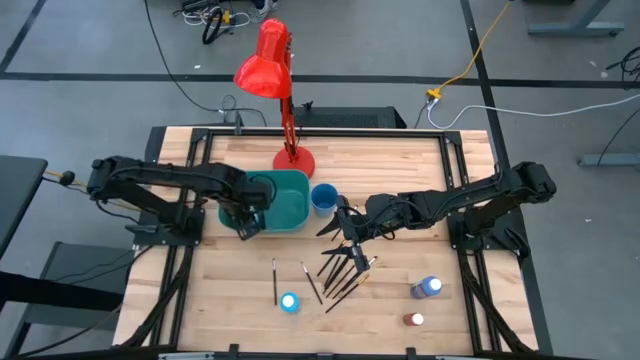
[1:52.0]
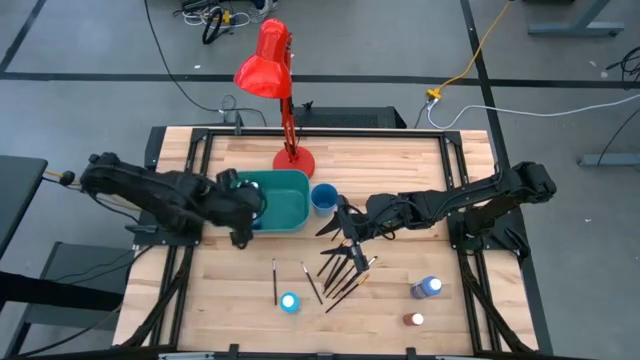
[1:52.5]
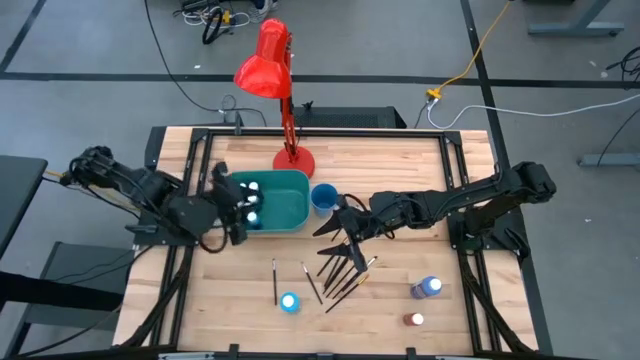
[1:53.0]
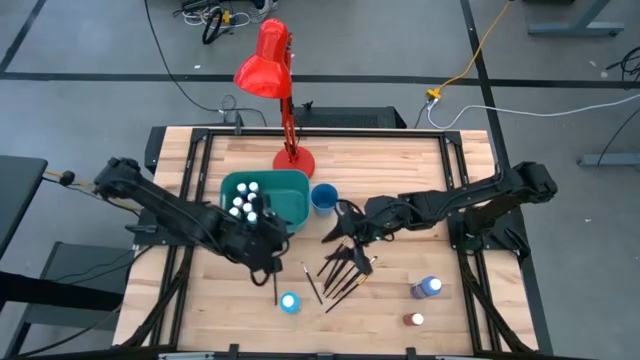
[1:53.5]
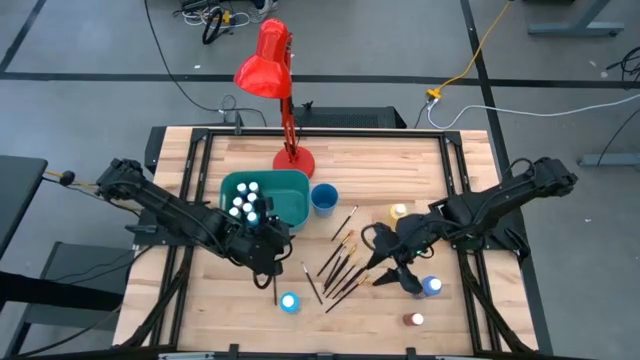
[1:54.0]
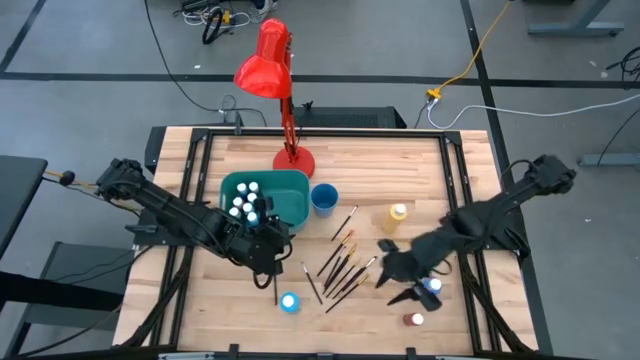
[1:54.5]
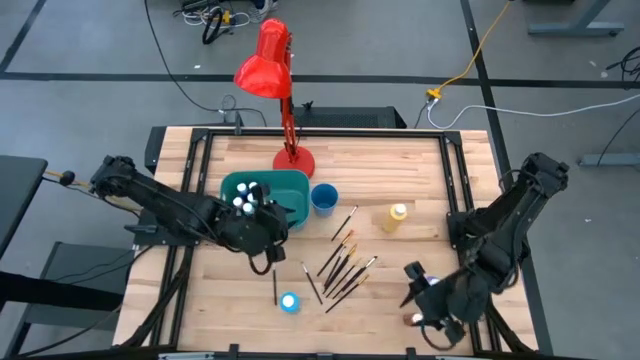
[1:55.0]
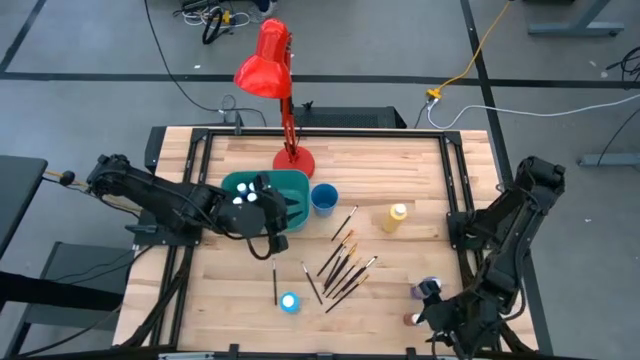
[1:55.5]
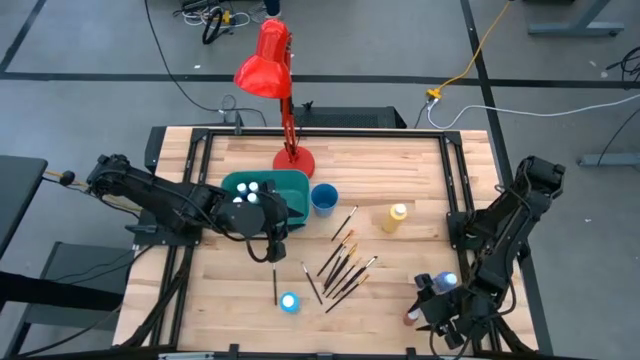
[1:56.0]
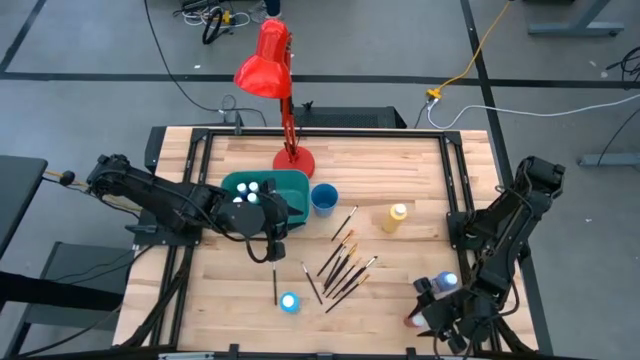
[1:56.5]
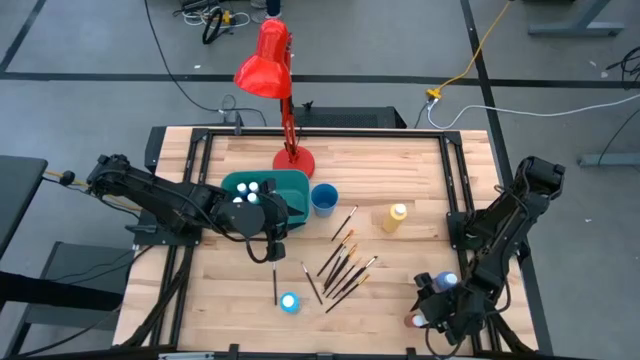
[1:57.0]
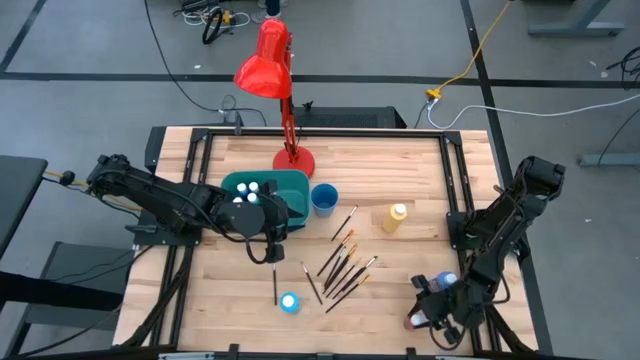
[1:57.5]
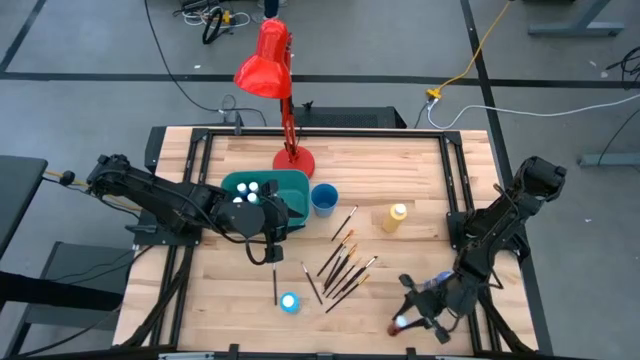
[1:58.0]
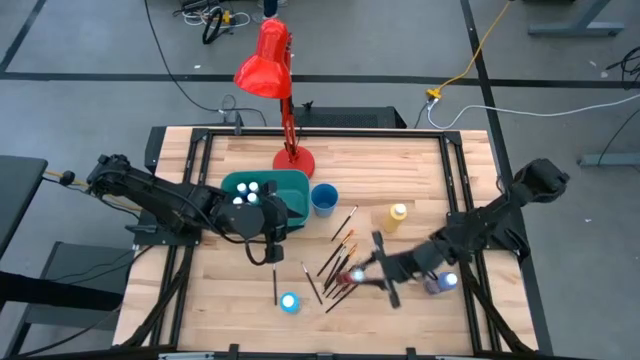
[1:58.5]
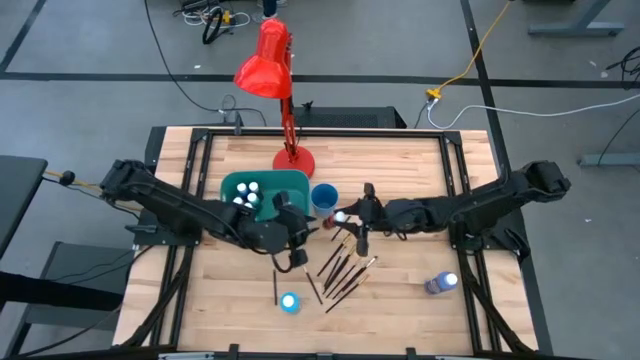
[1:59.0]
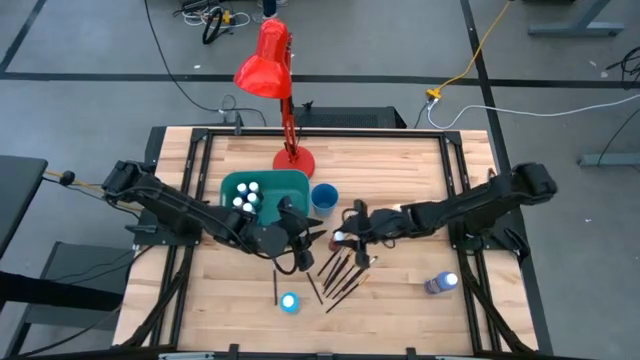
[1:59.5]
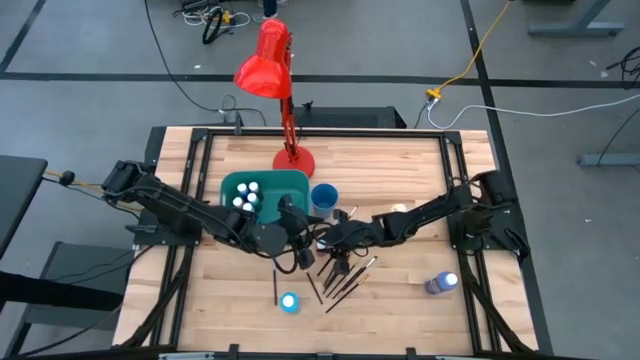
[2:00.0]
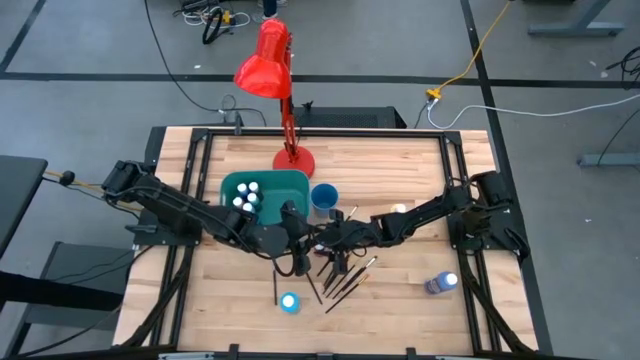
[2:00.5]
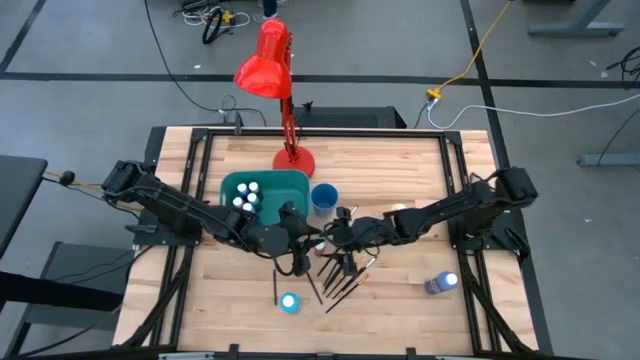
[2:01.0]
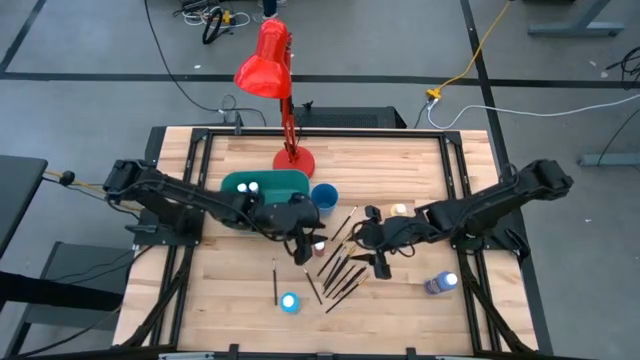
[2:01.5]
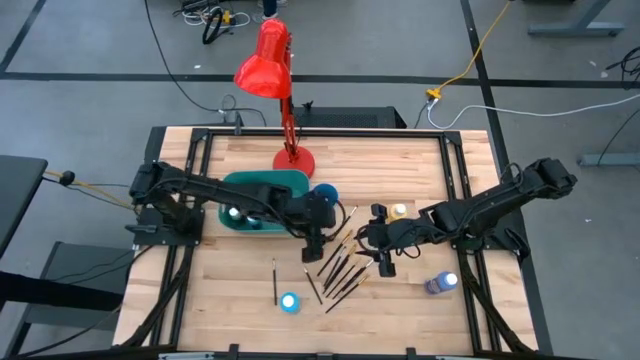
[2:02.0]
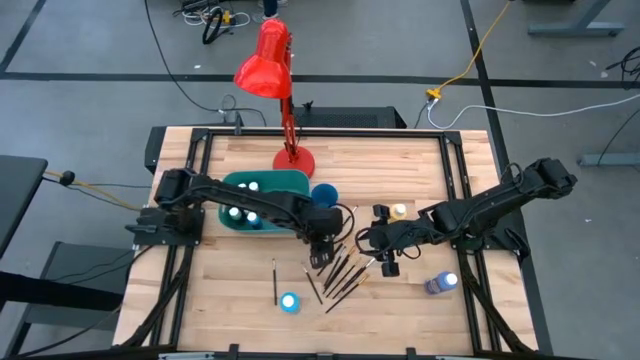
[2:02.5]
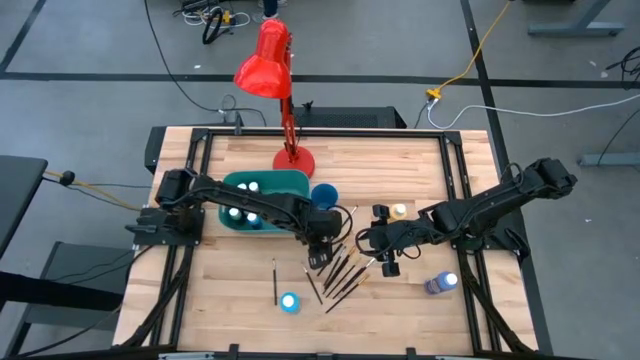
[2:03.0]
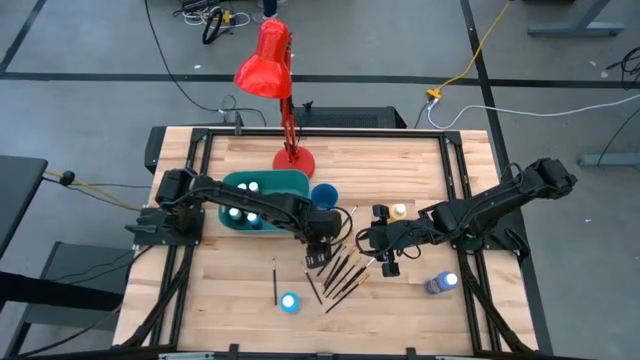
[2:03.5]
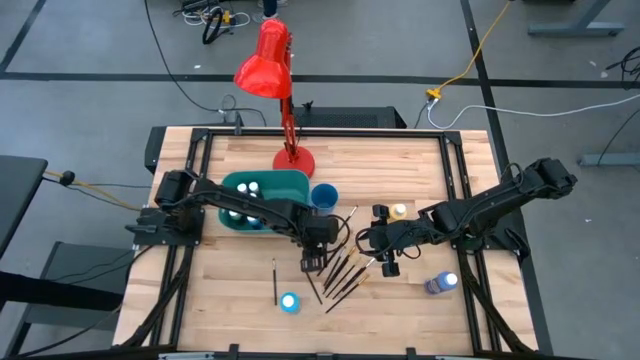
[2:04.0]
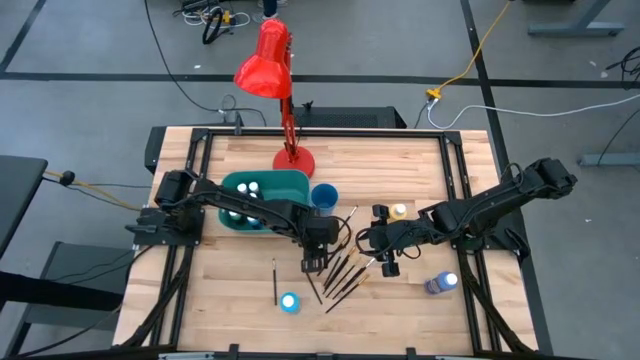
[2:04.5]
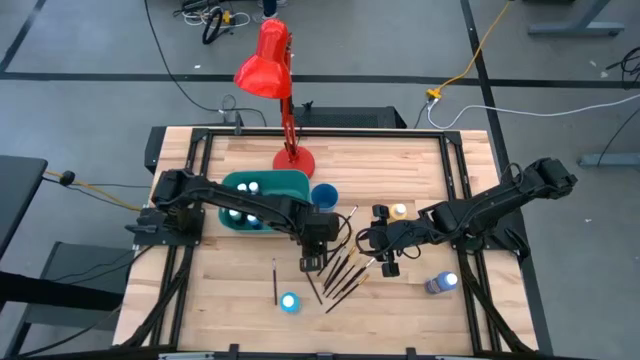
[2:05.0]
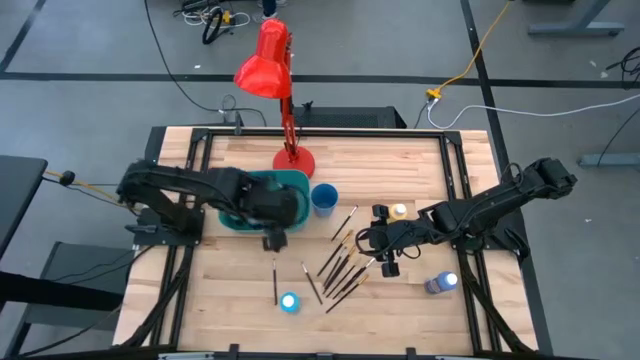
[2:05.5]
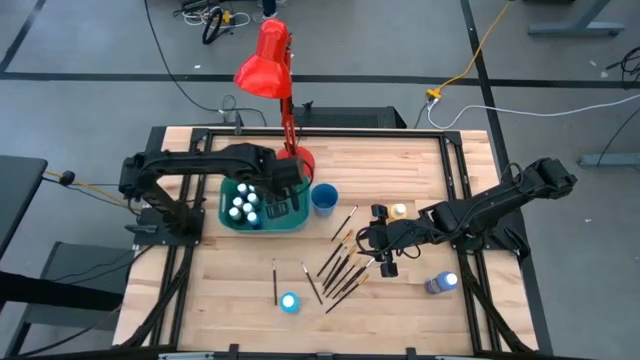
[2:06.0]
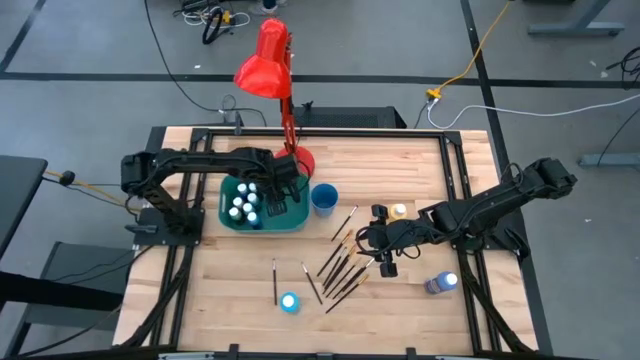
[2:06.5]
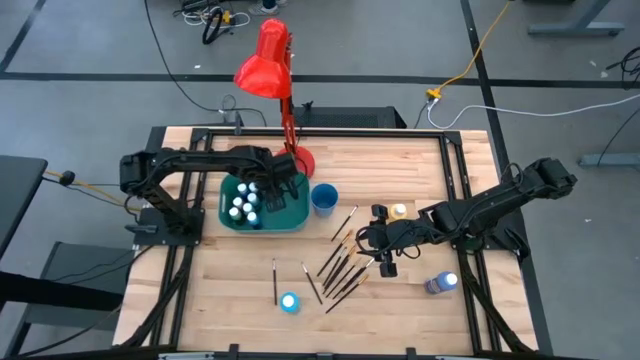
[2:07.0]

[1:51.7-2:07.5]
Task: Pick & Place Paint Supplies
Put the red orange paint bottle into the green bin

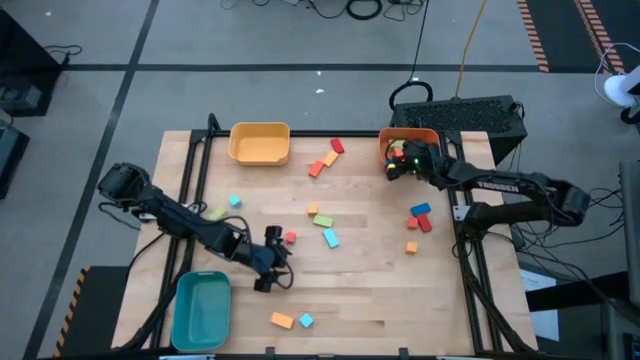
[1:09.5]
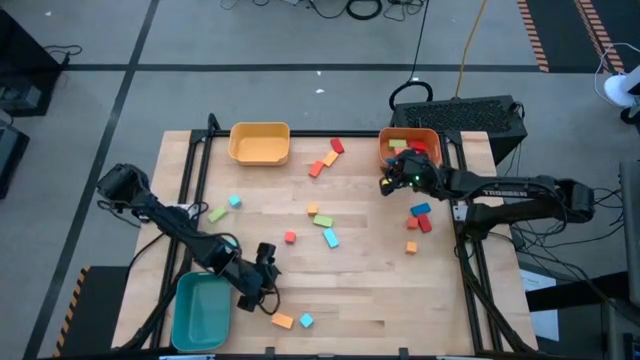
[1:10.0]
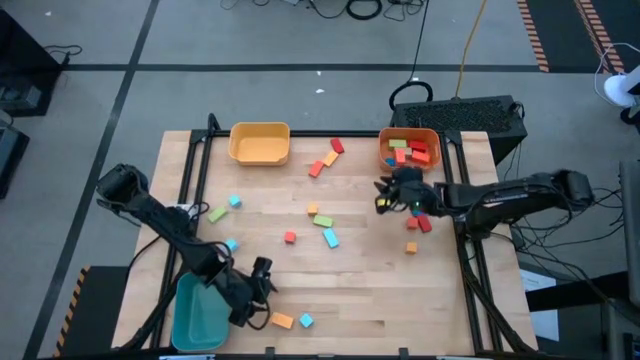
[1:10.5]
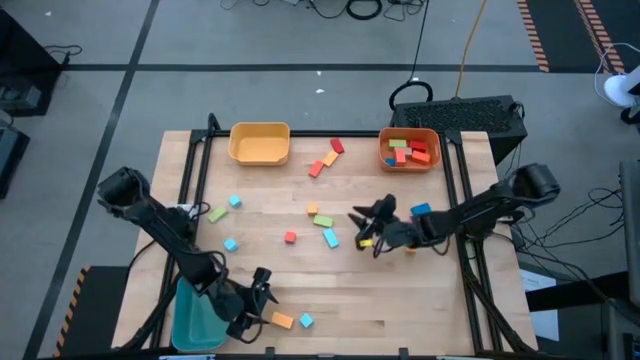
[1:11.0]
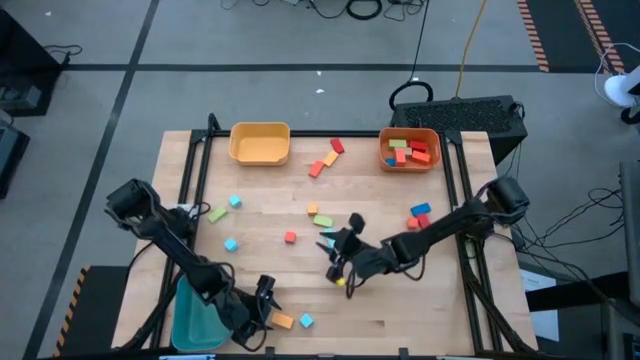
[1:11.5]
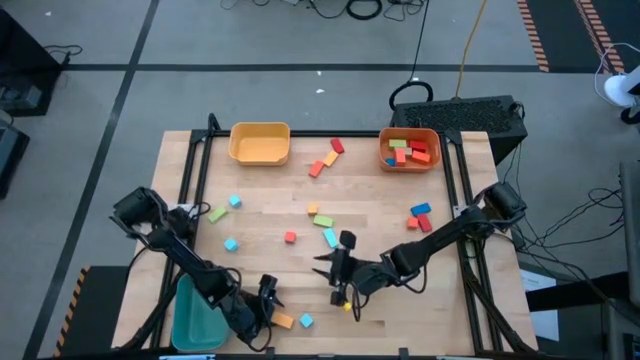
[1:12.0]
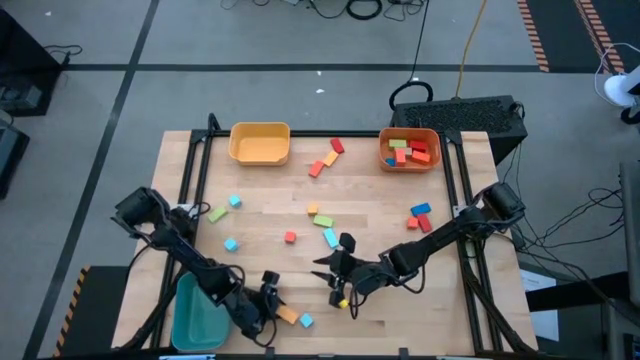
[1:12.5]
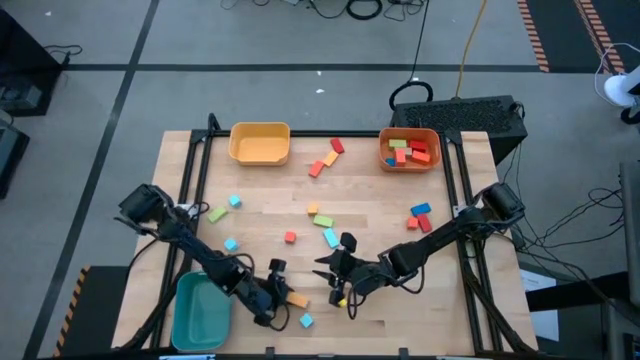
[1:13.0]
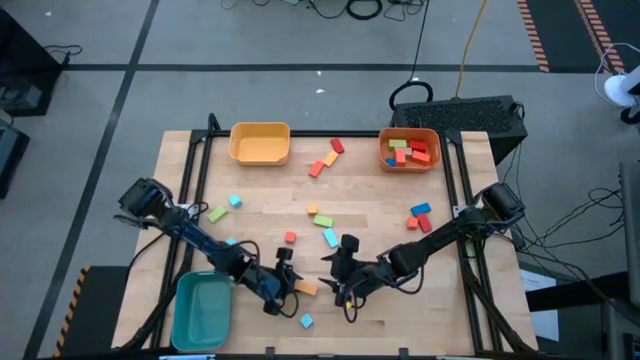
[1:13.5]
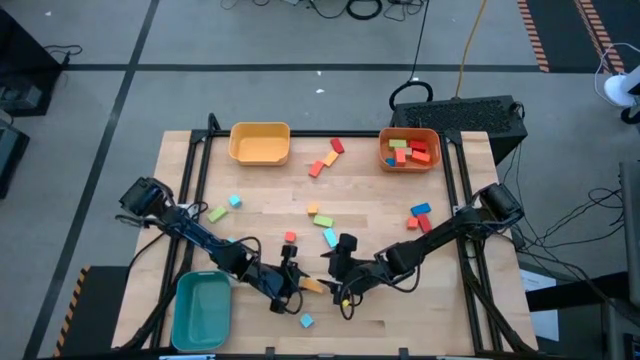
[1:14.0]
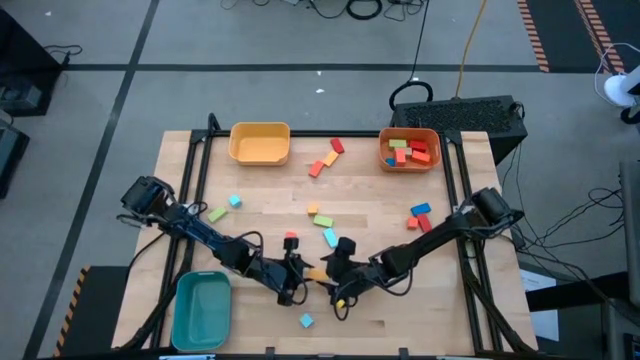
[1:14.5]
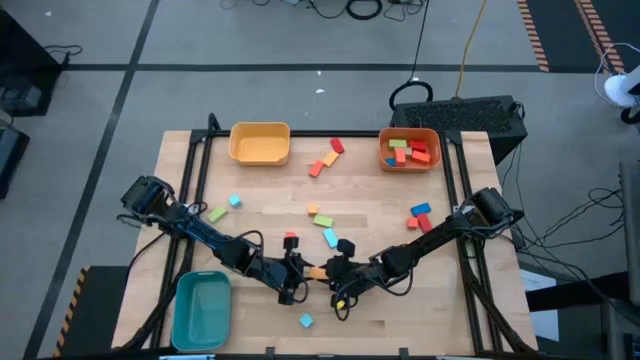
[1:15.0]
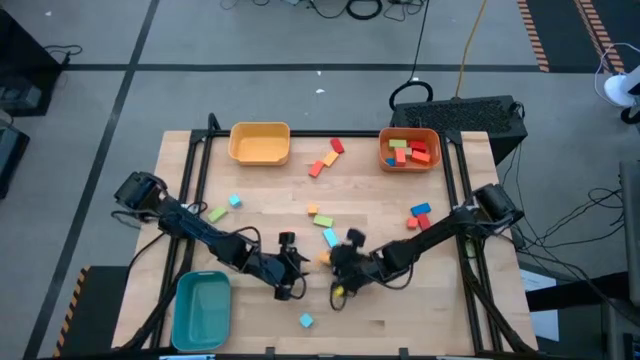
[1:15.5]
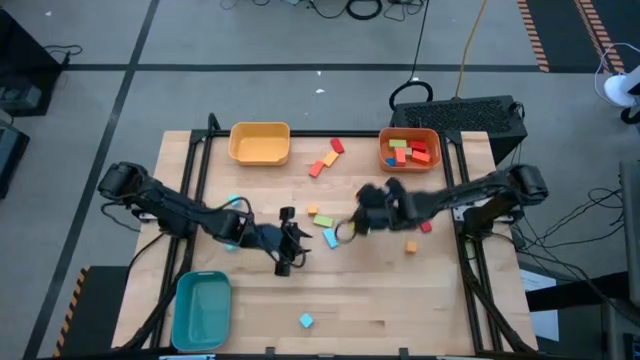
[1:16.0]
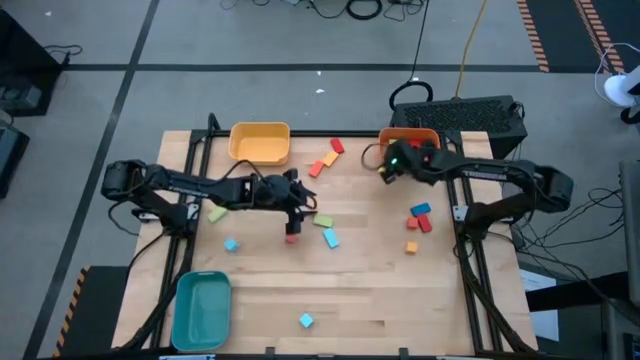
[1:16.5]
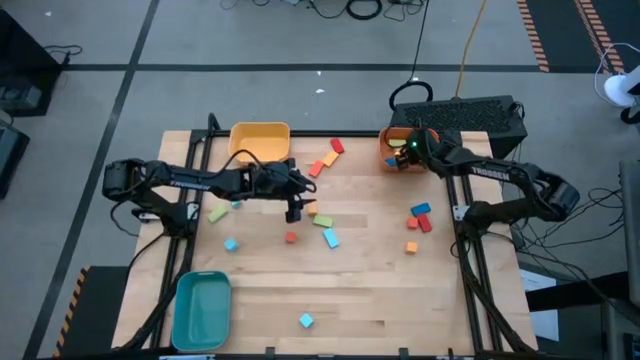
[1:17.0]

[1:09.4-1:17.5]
Task: Sort blocks by size
Put the large yellow block into the orange bin
